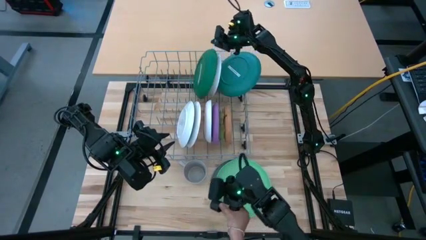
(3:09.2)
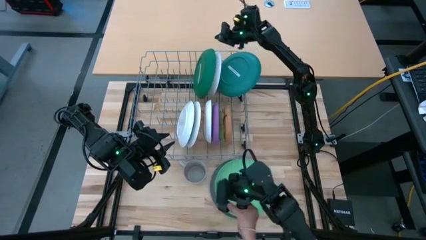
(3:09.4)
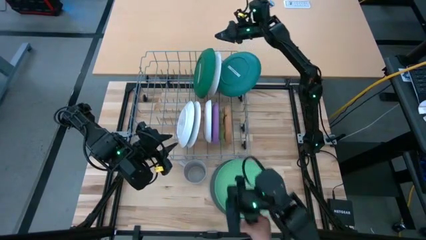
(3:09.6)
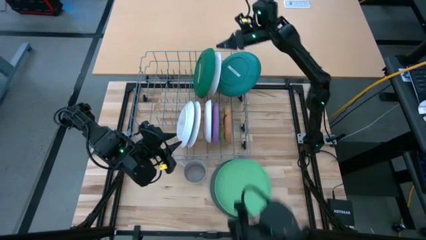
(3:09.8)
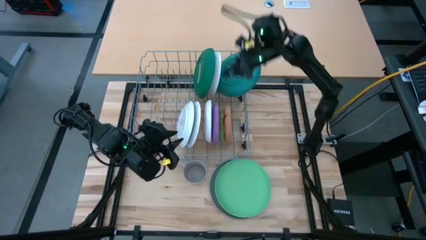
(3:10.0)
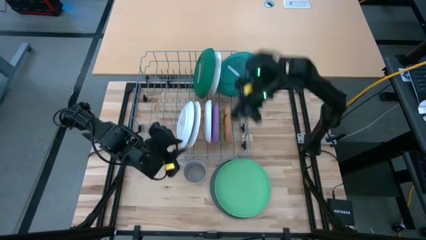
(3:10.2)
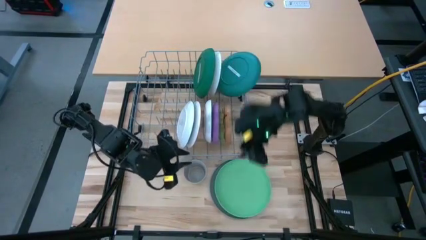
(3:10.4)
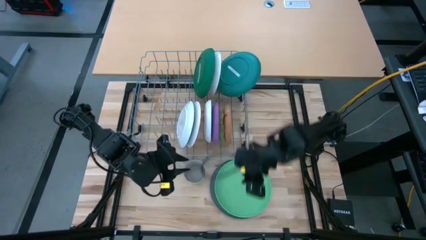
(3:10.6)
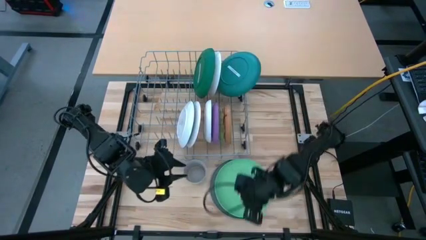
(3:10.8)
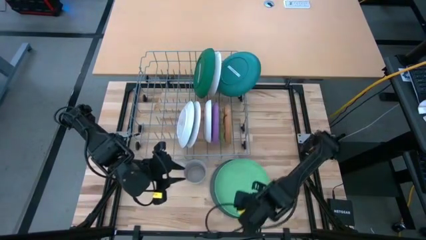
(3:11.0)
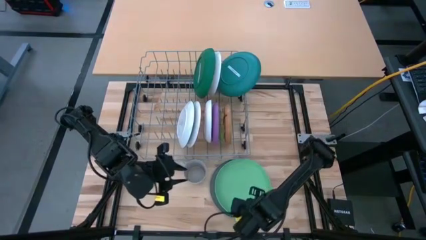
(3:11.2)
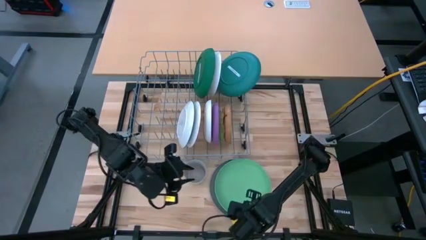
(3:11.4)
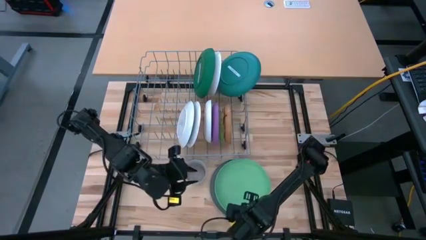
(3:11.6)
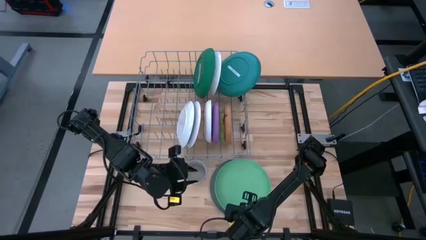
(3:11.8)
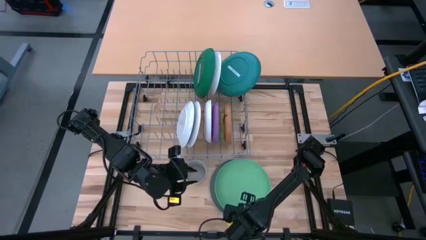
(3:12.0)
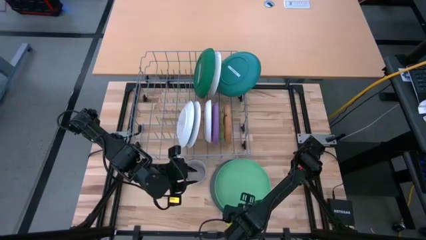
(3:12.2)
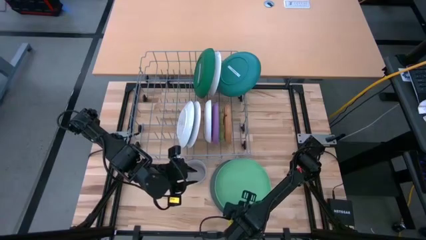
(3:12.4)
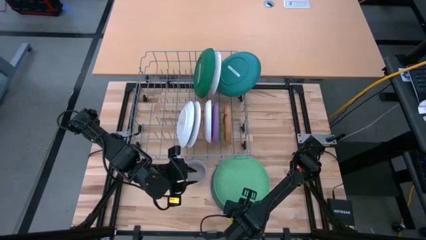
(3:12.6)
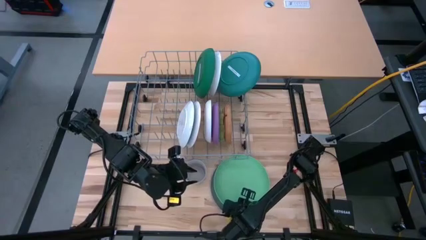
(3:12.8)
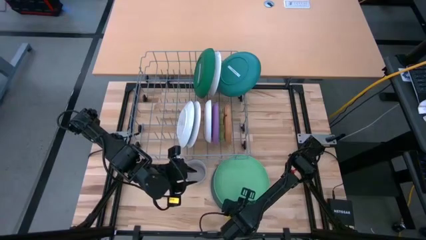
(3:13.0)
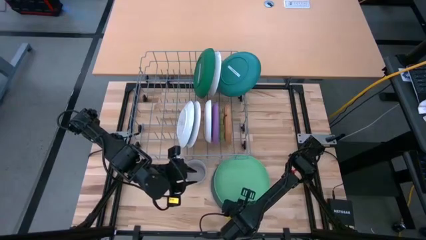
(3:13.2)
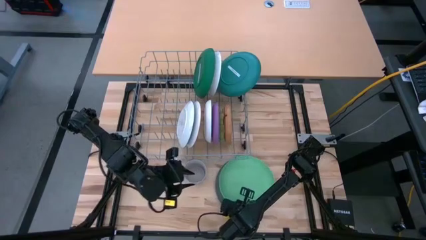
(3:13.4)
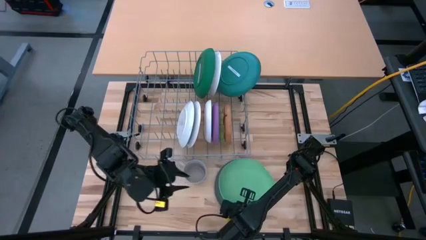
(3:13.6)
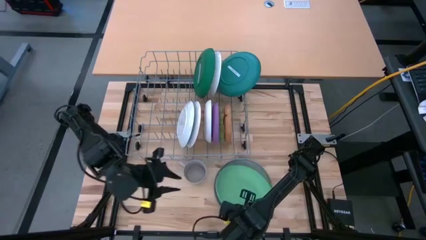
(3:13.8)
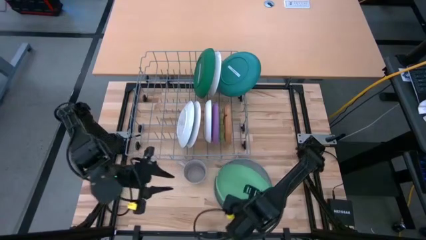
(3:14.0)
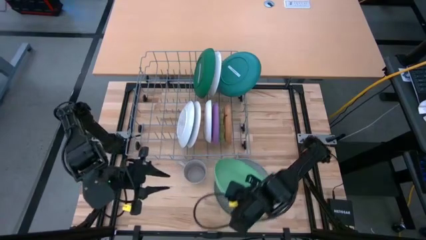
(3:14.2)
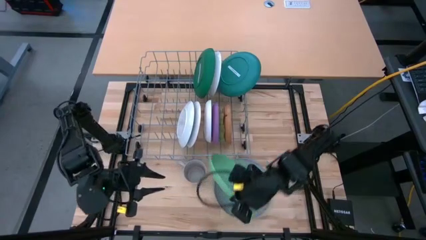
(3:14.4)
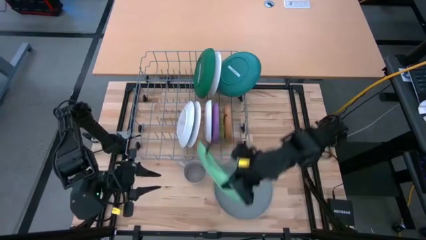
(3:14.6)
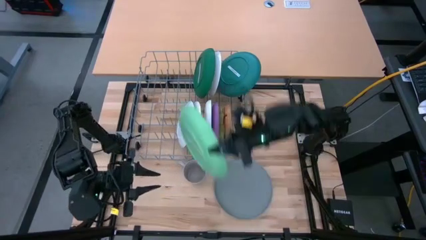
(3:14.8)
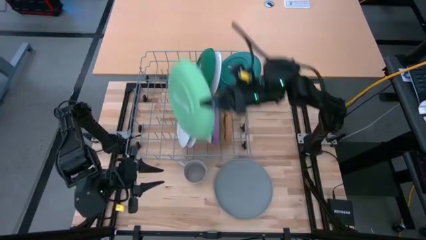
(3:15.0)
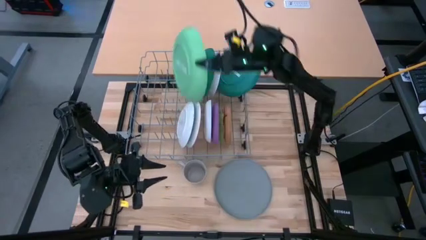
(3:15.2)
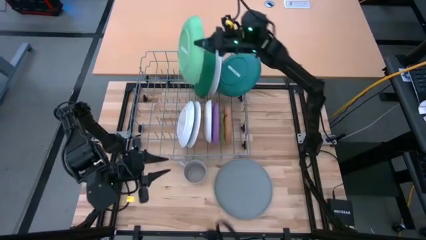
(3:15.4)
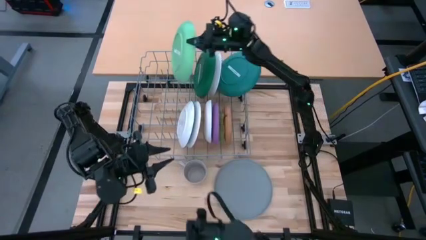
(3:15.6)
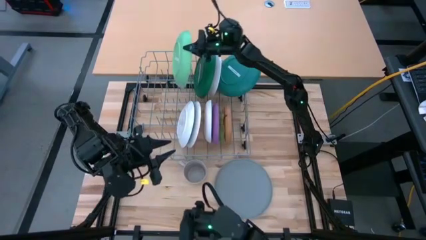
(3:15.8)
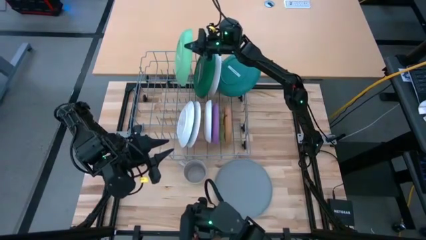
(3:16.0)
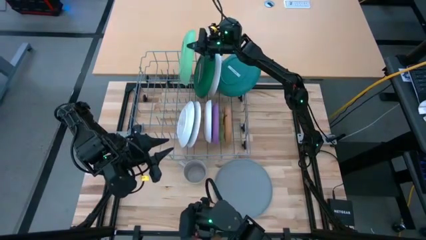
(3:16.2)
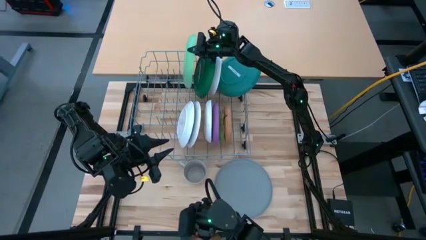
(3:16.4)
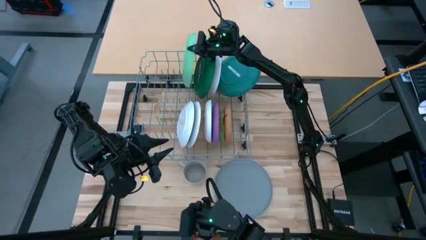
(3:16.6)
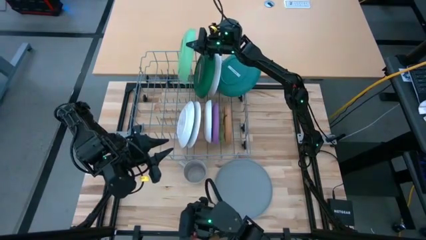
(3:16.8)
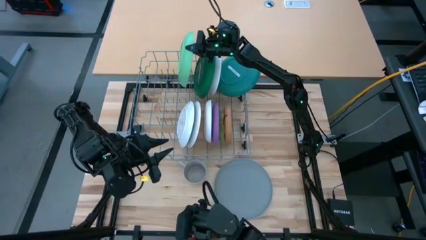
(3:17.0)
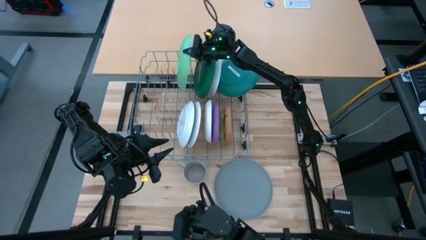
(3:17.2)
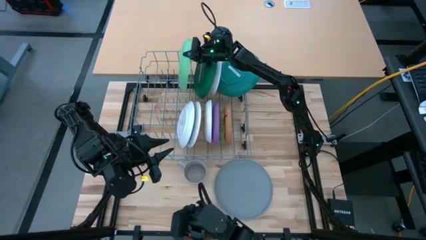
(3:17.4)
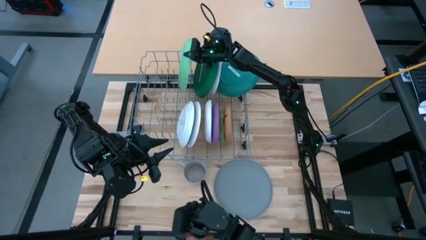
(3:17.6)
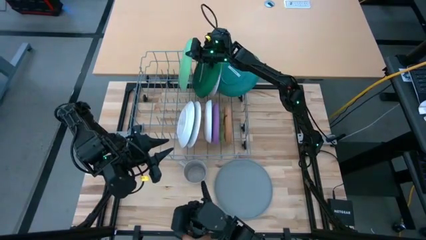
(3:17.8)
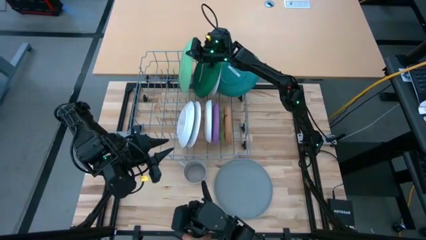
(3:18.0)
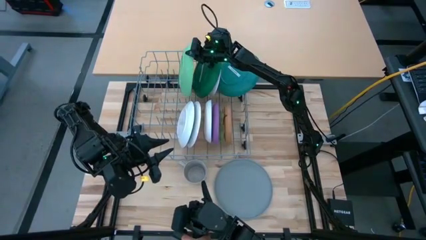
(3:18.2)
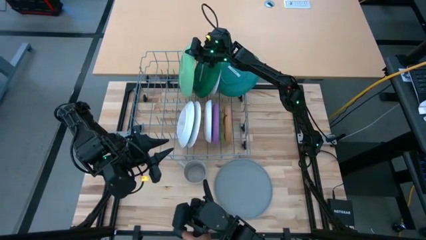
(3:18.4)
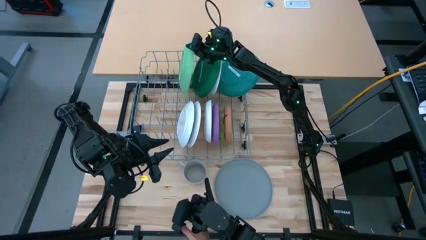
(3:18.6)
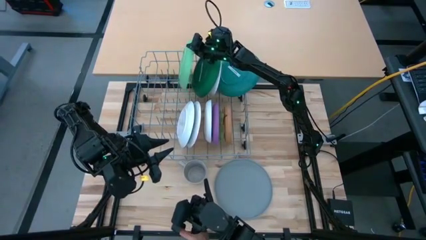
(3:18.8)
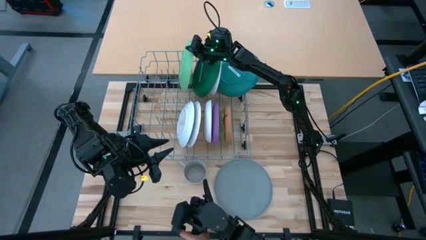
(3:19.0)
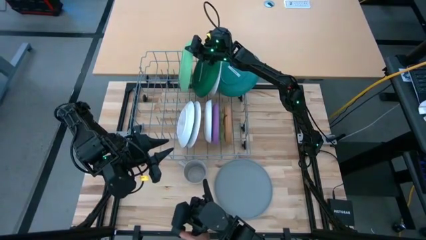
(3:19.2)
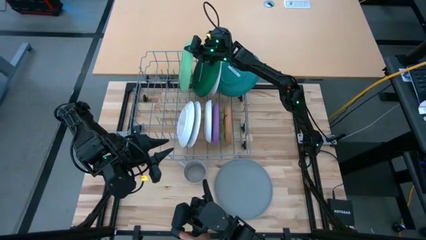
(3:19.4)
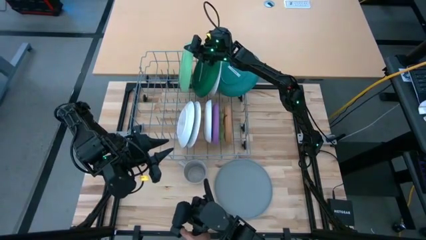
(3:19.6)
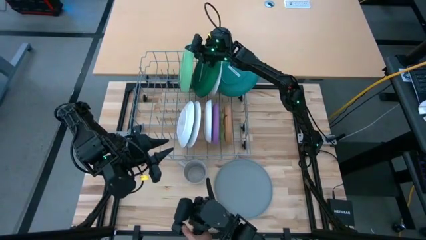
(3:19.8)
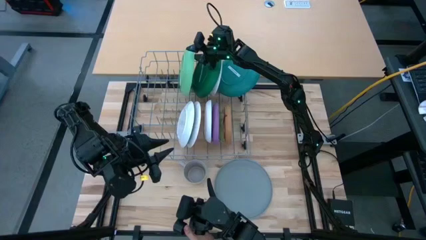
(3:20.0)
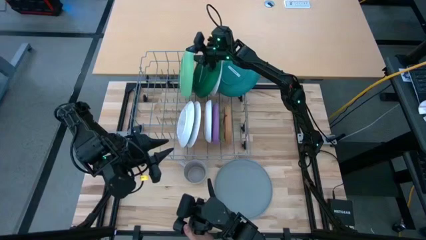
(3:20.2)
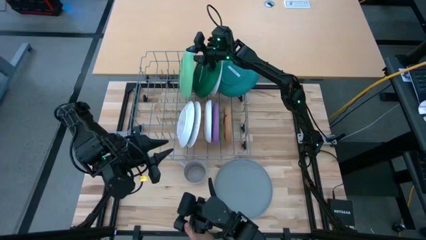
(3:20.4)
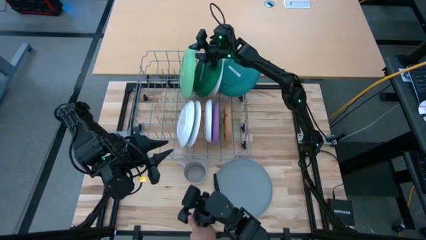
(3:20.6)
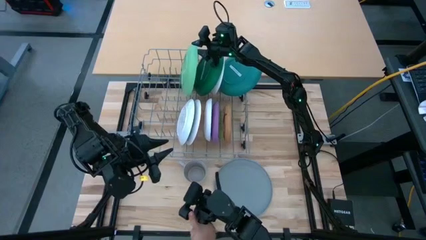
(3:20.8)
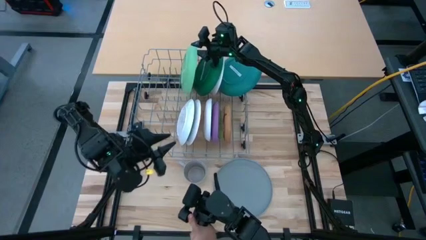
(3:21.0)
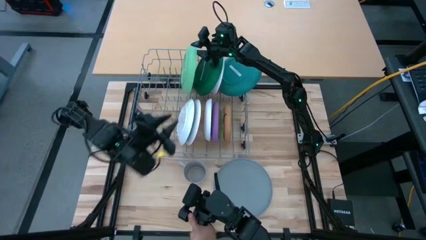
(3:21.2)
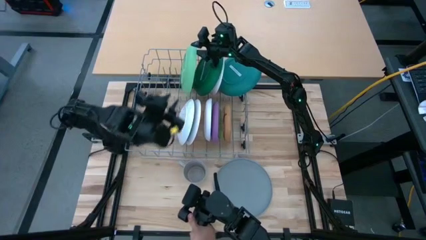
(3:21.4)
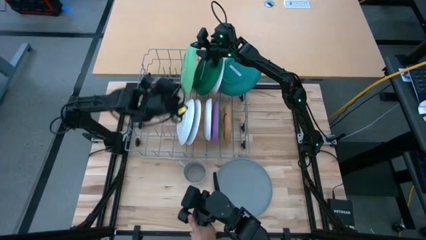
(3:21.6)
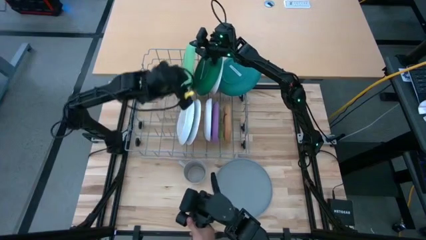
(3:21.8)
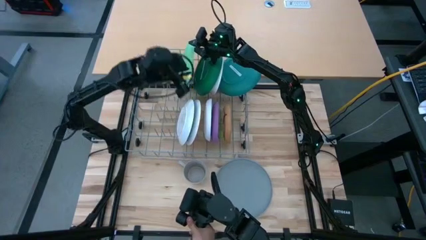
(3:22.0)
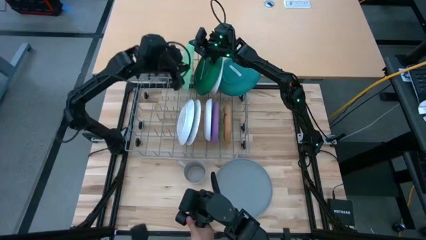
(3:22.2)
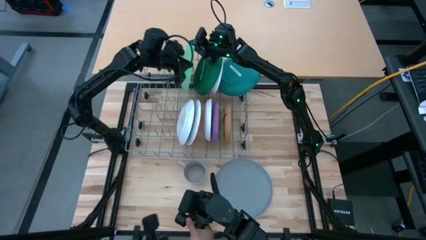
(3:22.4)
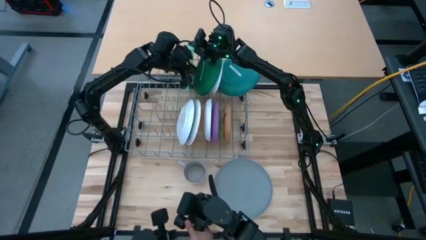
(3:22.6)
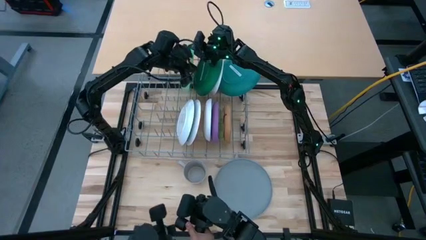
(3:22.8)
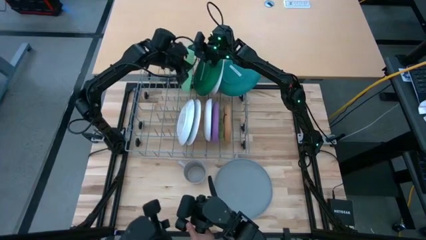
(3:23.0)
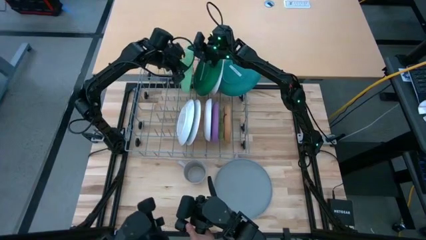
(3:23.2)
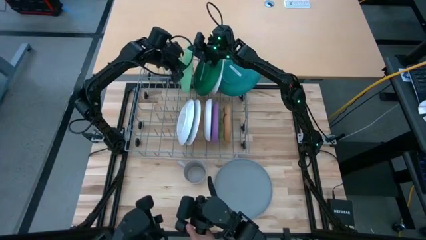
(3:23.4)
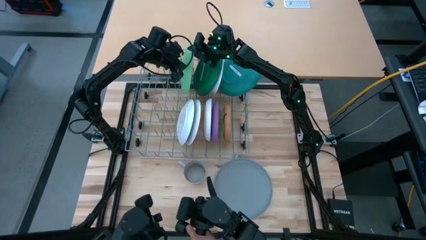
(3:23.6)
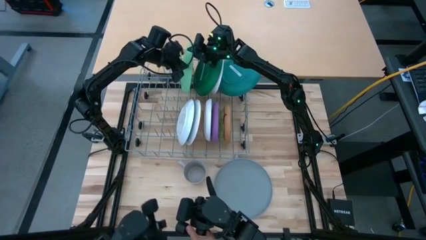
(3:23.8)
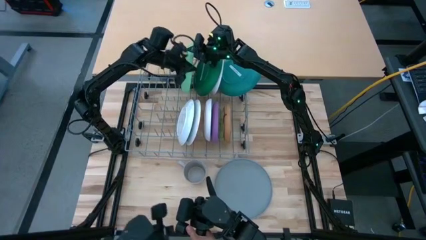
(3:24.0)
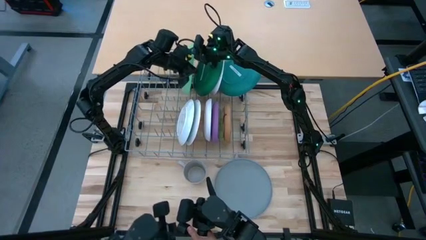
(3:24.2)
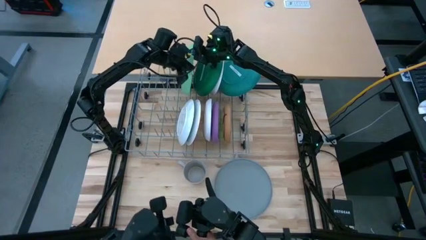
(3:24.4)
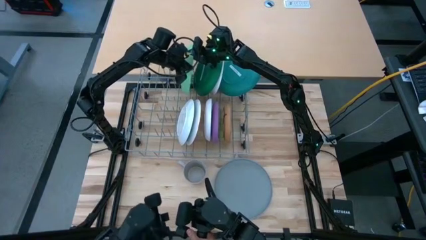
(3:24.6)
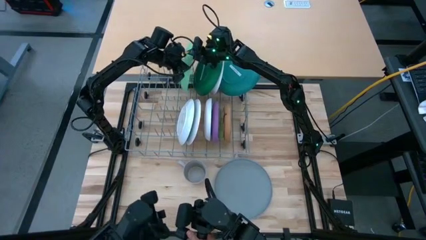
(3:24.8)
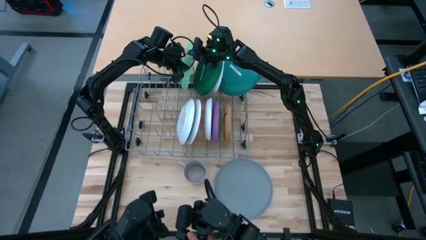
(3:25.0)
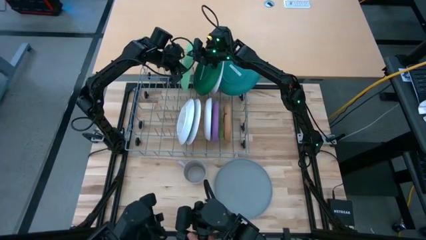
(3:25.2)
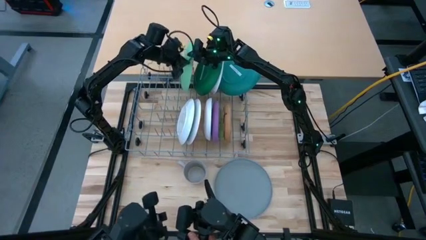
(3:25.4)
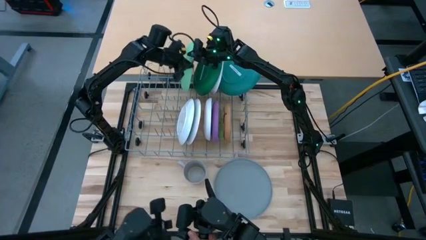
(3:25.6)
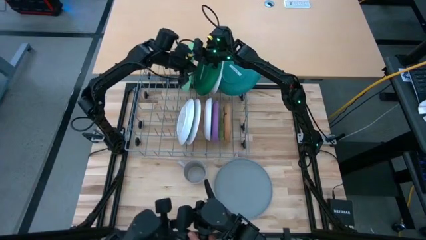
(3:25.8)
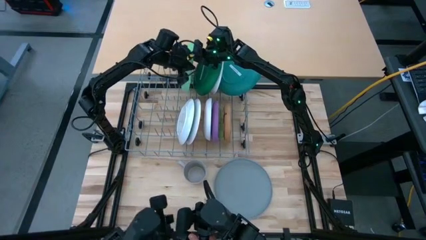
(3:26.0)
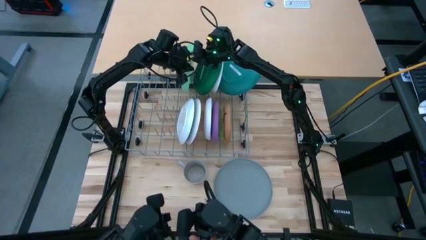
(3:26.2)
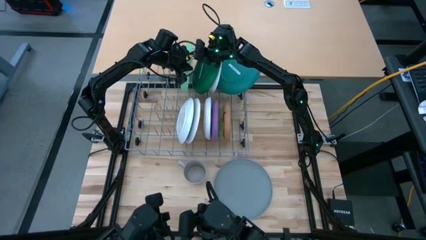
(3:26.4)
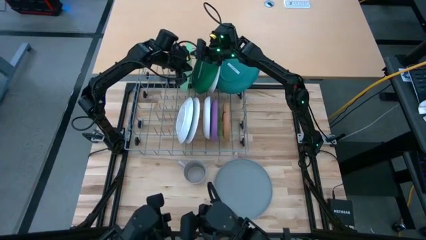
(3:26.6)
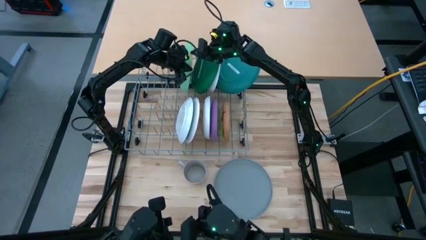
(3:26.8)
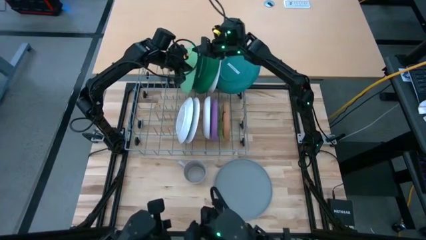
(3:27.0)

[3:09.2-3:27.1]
Task: Sort dishes
Put the light green plate in the dish rack
